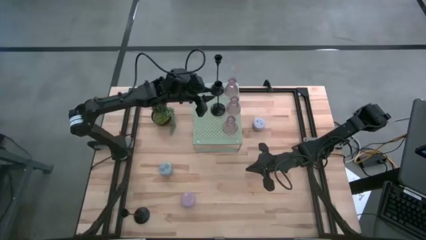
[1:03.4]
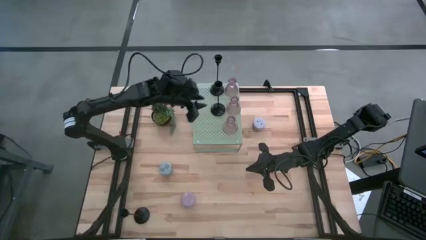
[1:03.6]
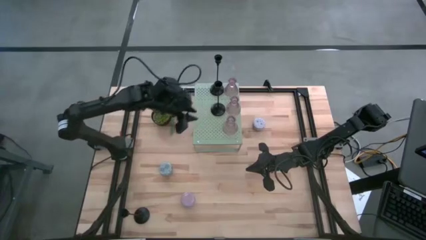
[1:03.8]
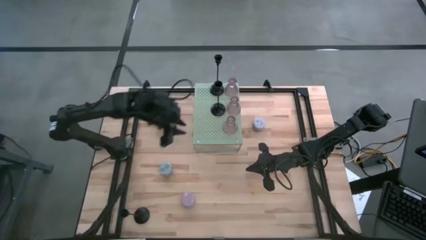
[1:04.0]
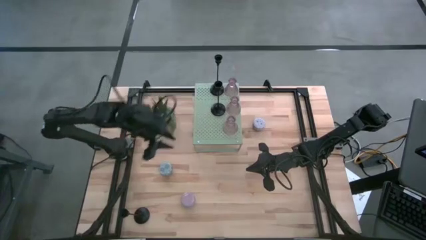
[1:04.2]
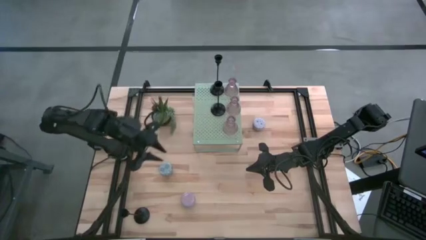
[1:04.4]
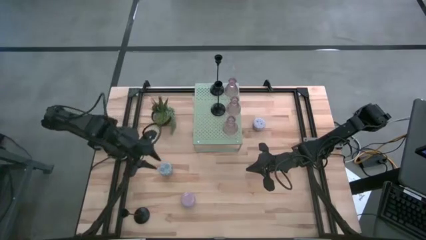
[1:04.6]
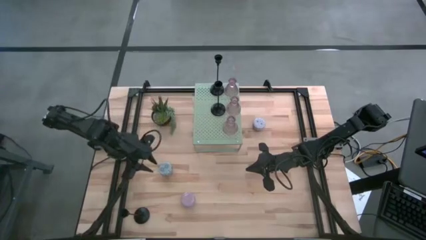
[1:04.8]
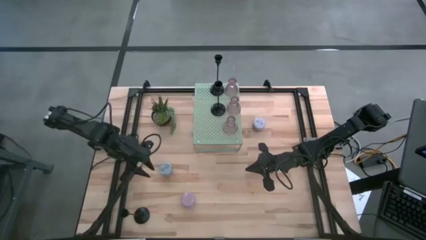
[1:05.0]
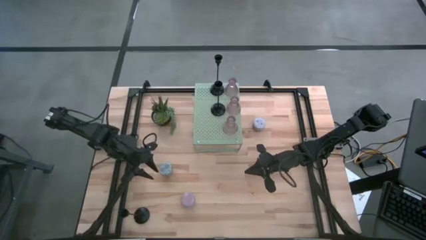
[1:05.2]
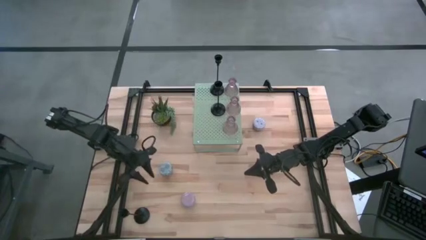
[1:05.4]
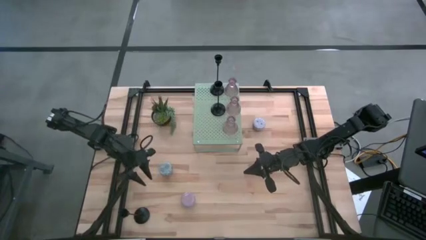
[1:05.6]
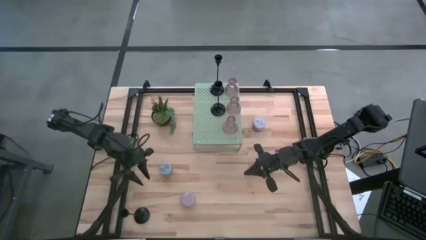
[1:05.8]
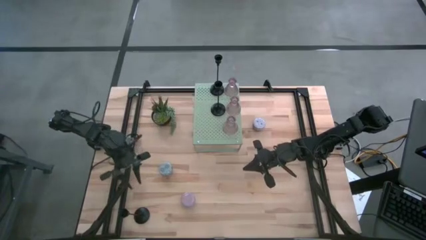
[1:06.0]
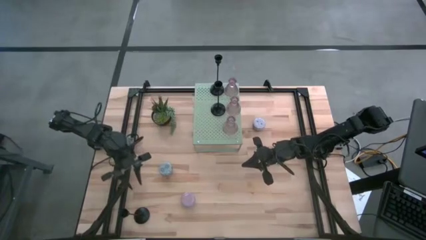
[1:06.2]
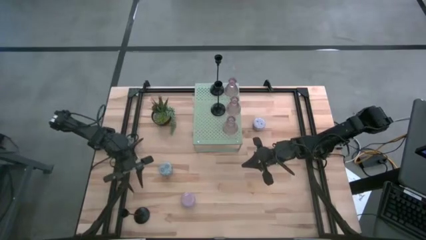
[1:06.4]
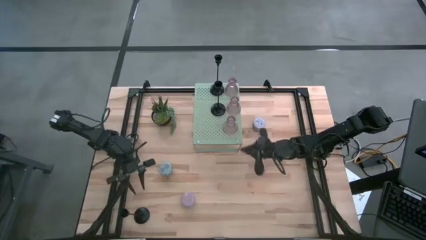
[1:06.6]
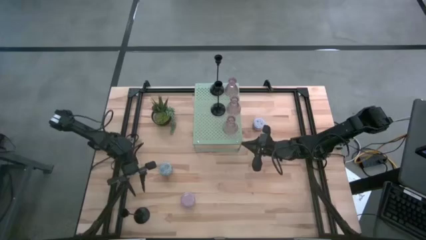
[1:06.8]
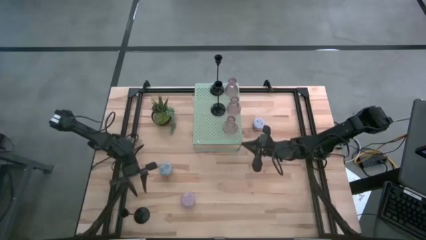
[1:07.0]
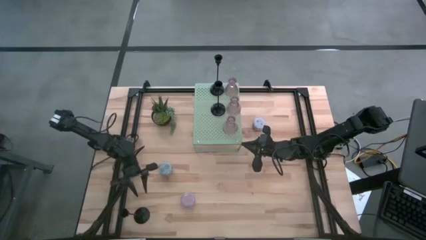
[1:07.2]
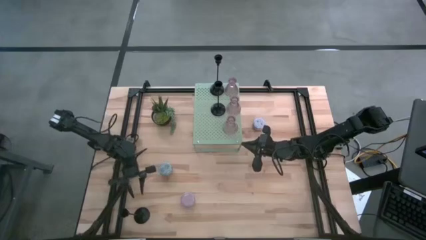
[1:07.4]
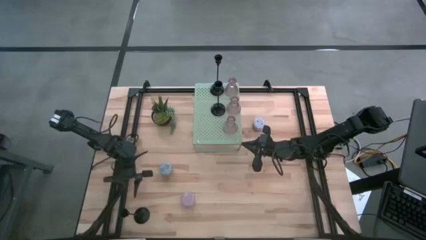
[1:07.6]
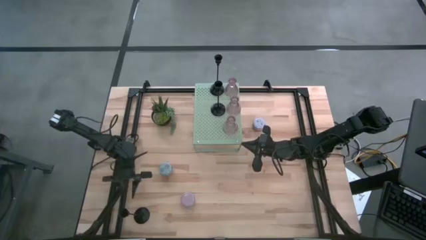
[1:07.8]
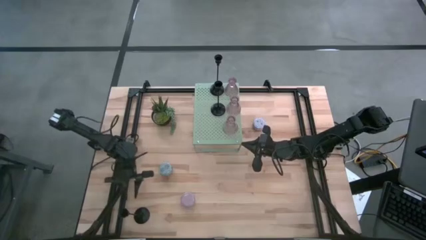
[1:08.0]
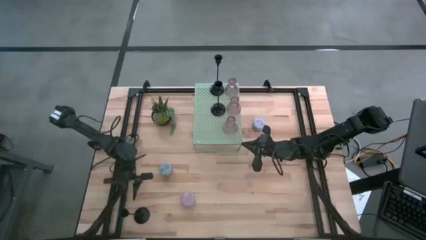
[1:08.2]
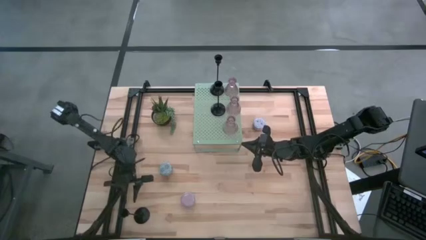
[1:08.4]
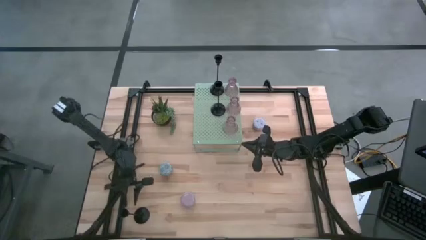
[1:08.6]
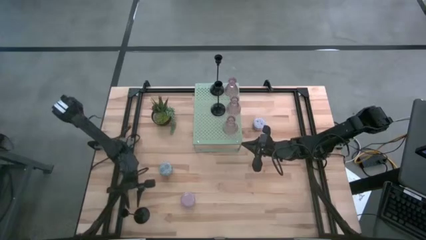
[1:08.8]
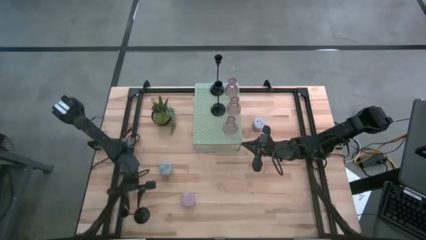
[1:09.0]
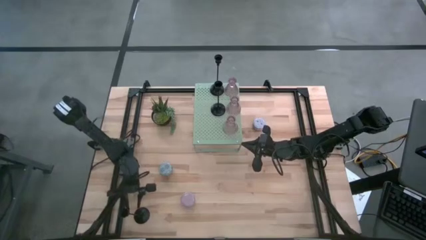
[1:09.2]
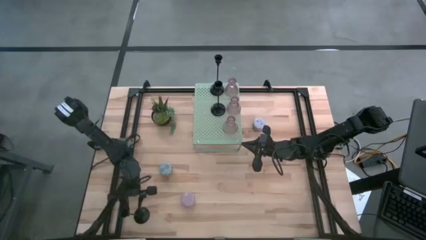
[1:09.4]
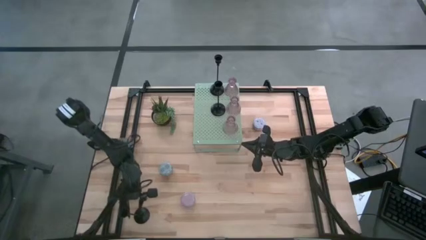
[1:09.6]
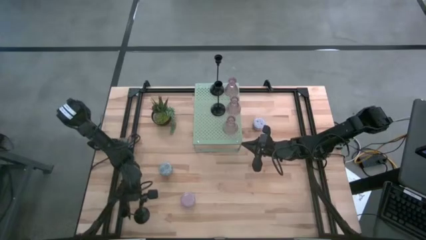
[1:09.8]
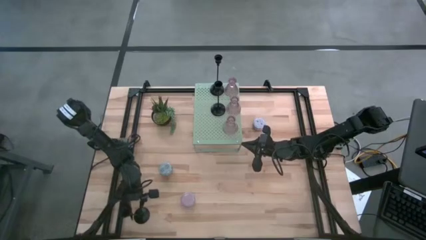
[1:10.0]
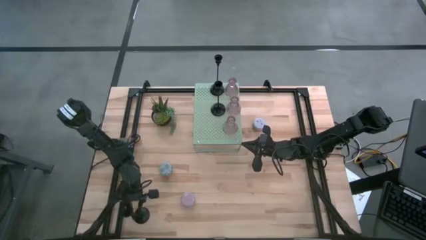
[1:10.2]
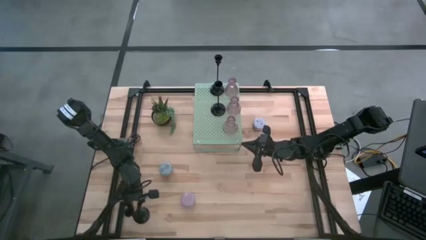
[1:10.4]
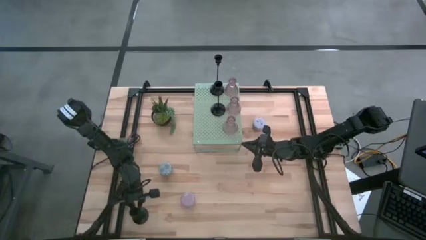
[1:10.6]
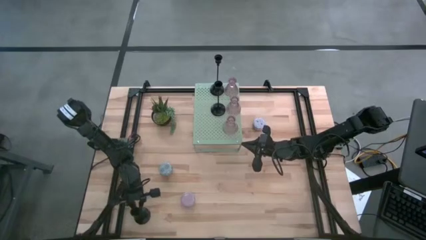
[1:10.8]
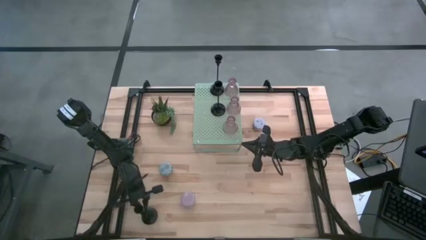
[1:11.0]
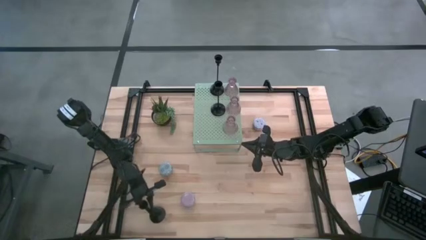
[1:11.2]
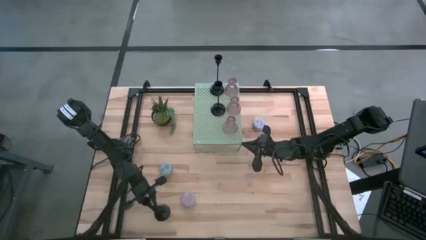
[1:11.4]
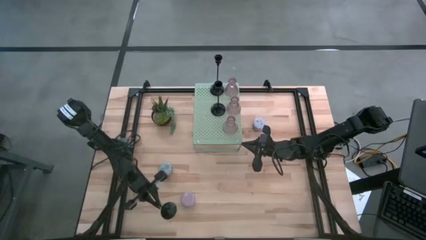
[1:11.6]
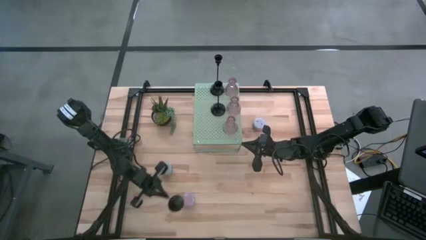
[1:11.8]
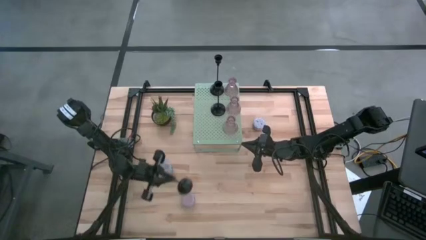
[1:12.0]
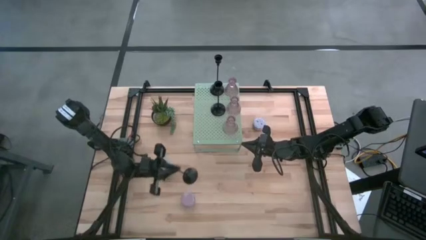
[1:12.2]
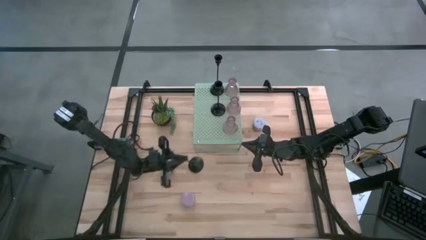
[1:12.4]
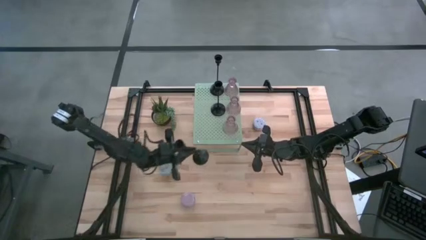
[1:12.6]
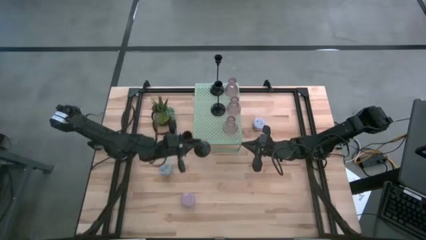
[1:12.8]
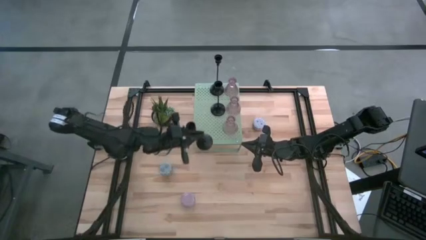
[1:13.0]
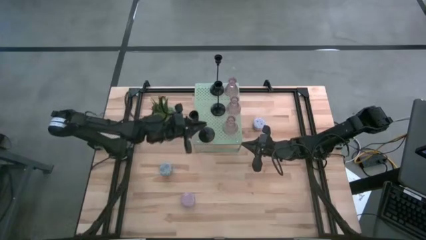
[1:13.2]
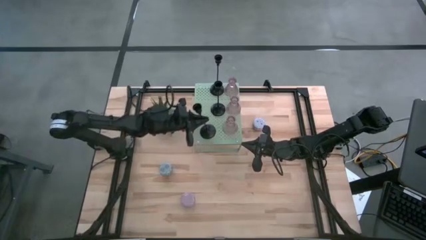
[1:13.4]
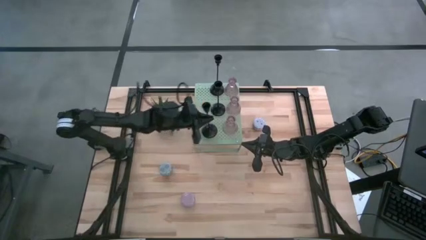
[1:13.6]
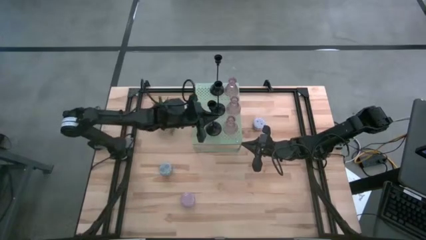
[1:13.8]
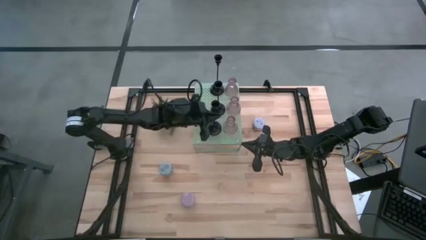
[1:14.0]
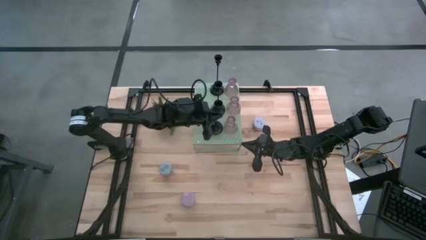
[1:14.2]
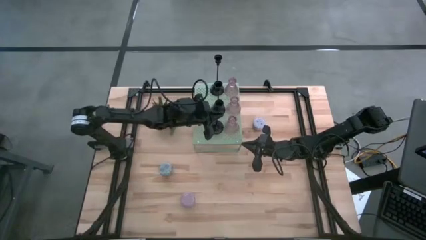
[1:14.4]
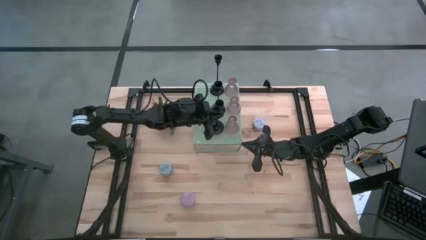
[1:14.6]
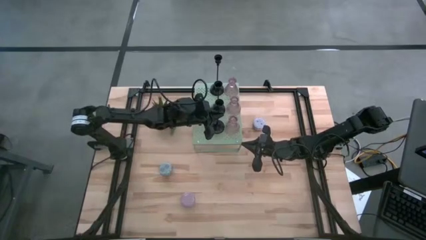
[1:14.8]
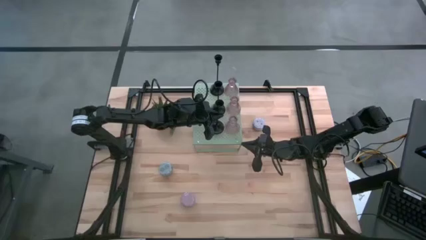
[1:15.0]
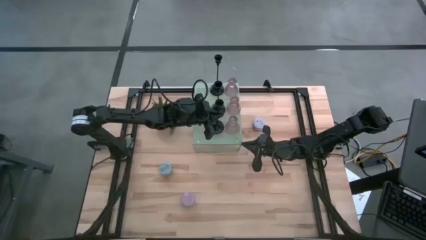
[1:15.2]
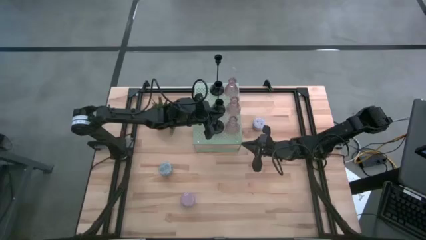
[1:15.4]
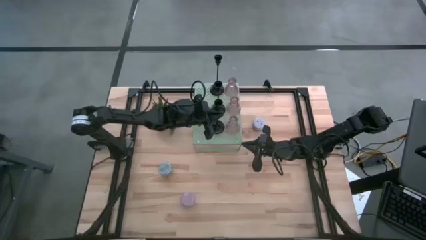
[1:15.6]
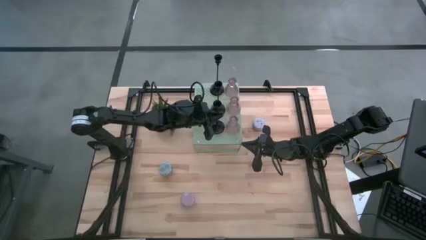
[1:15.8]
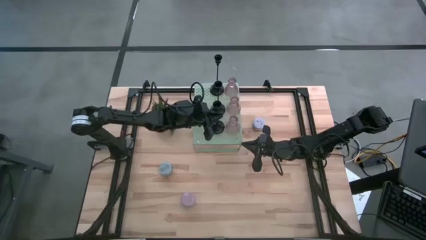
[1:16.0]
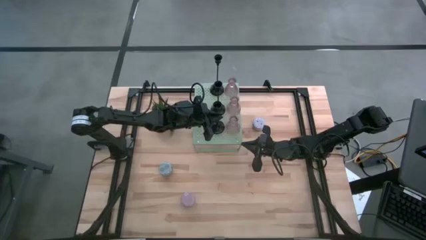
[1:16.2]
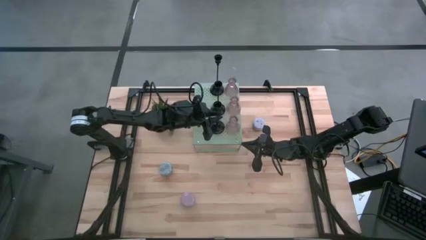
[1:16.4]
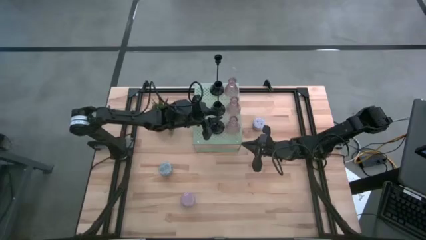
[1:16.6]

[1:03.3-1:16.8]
Task: Pick & Place candle stick holders
Put the black candle holder on the shelf aligned with the other black candle holder
